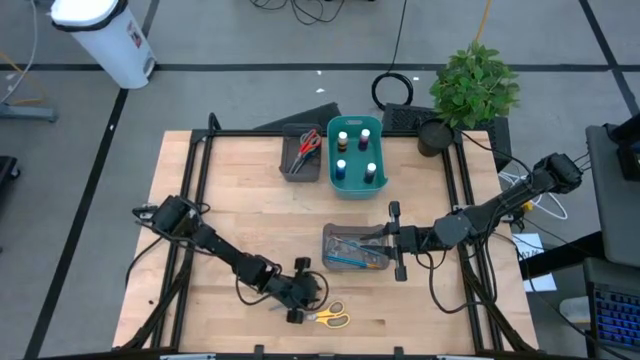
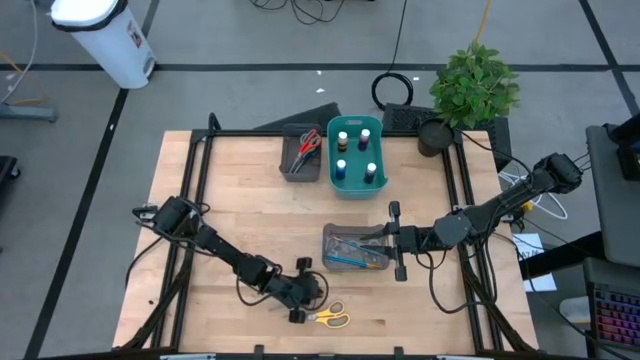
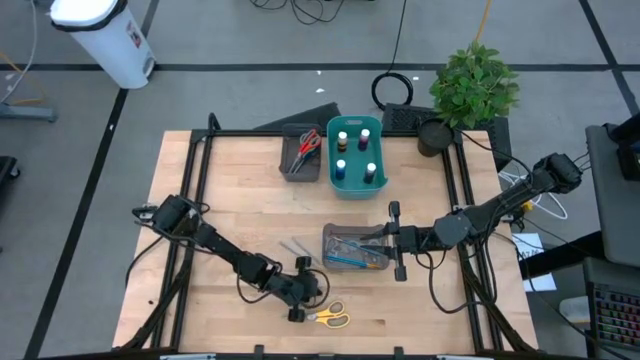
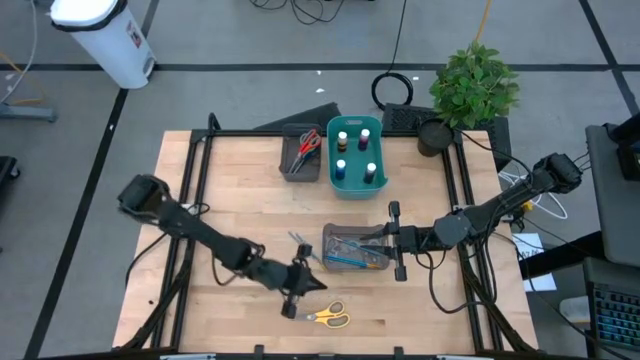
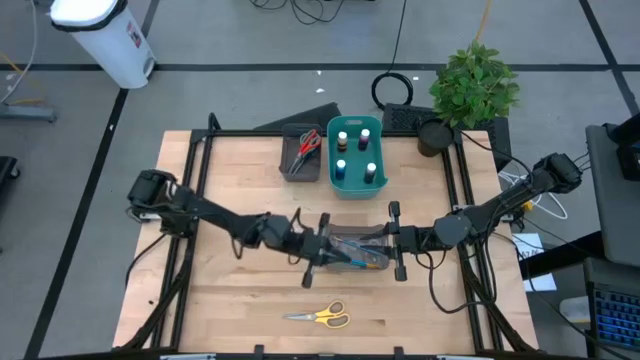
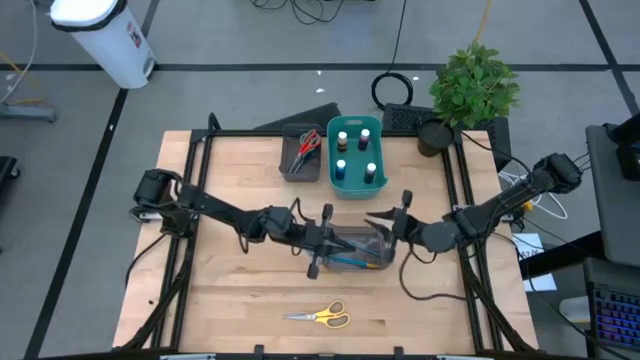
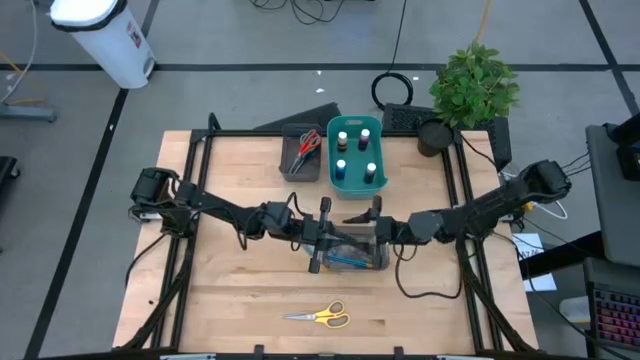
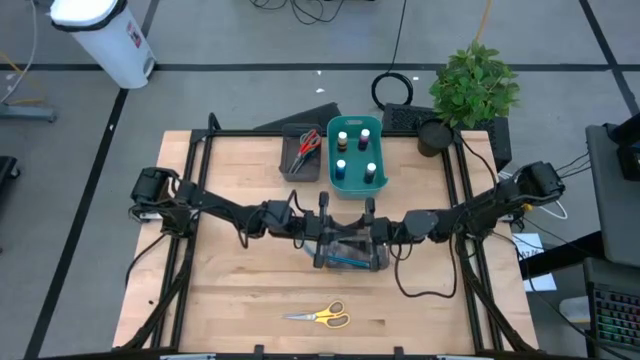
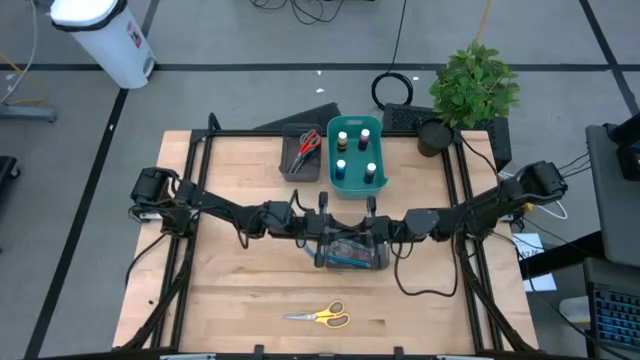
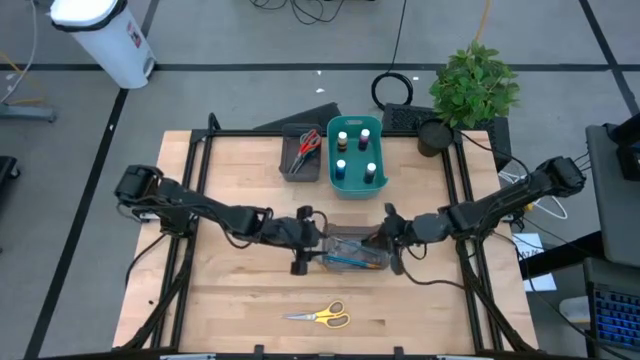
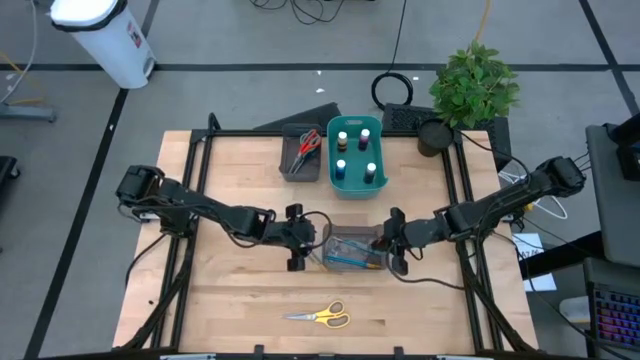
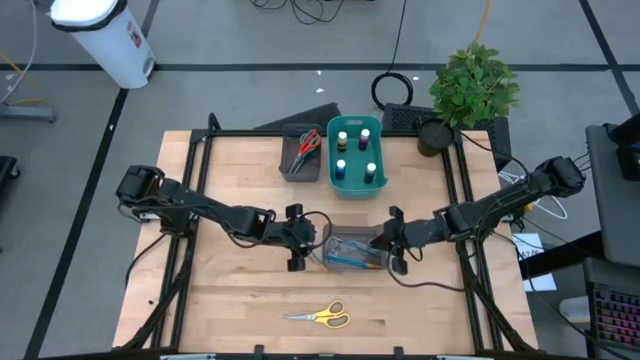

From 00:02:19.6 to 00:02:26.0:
Task: Pick & Place Paint Supplies
Put the blue paint brush into the bottom black bin

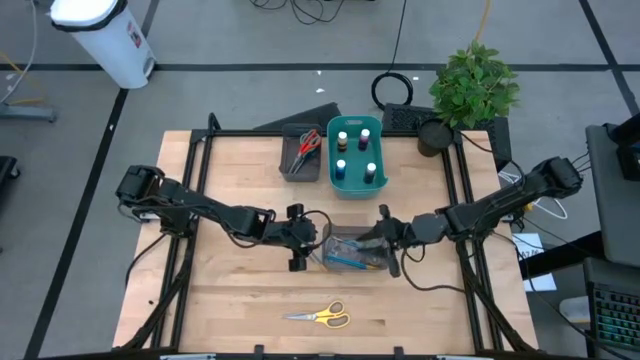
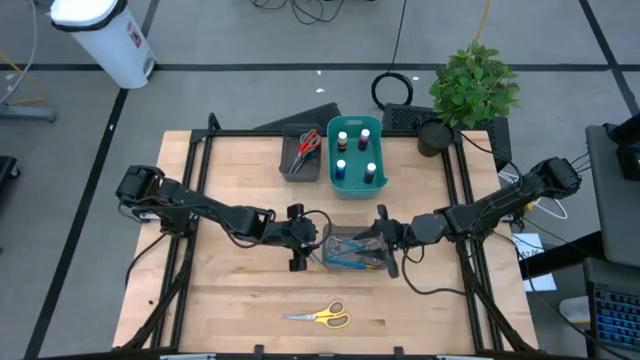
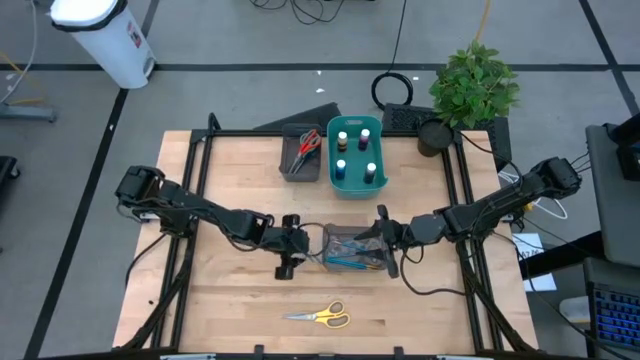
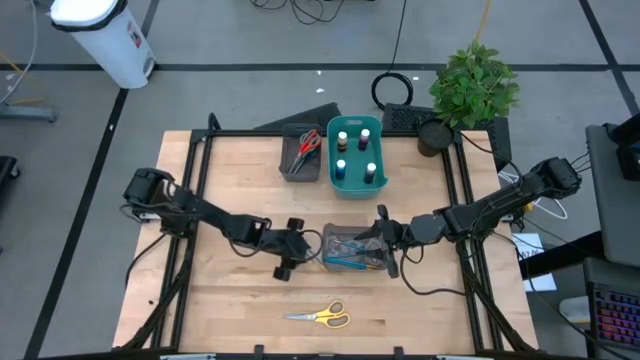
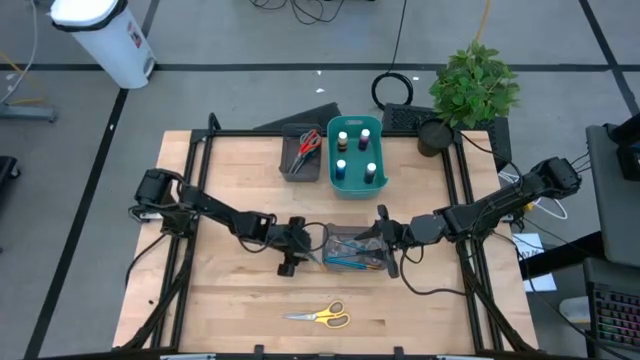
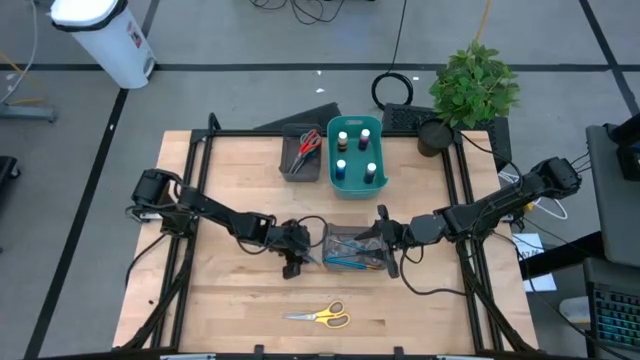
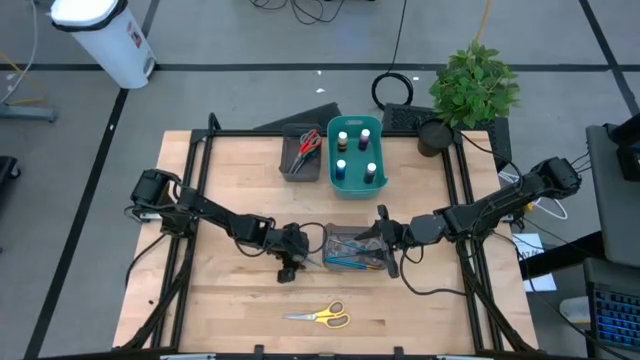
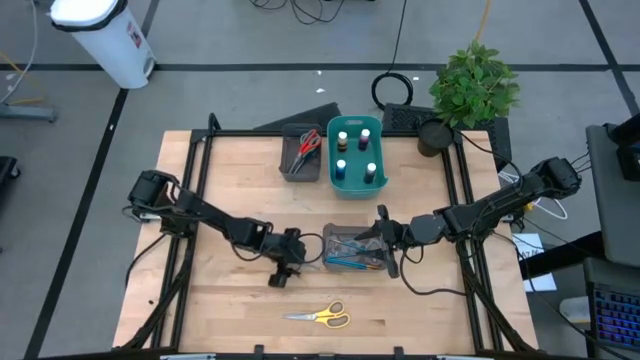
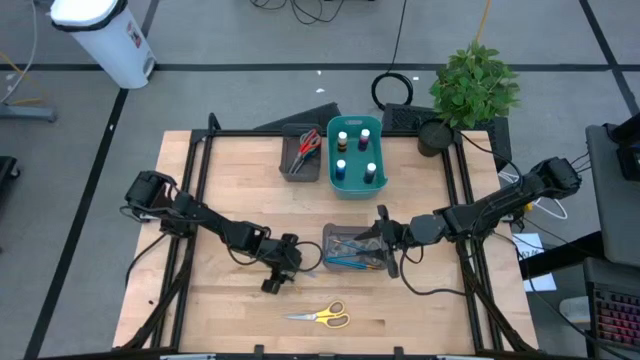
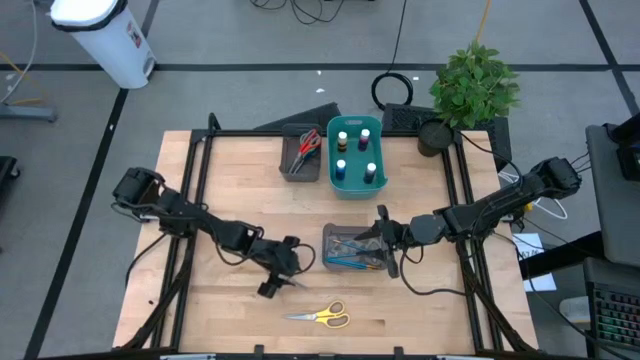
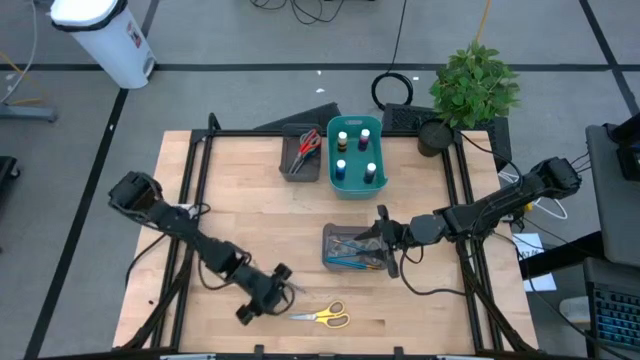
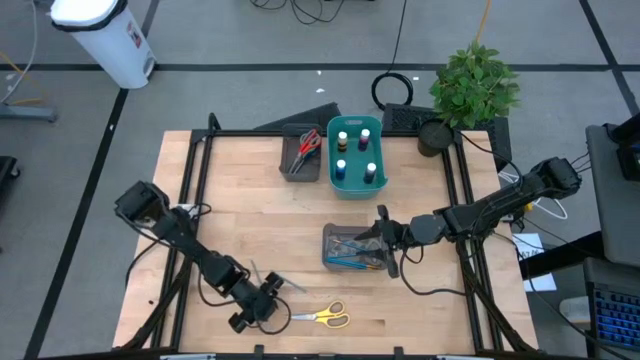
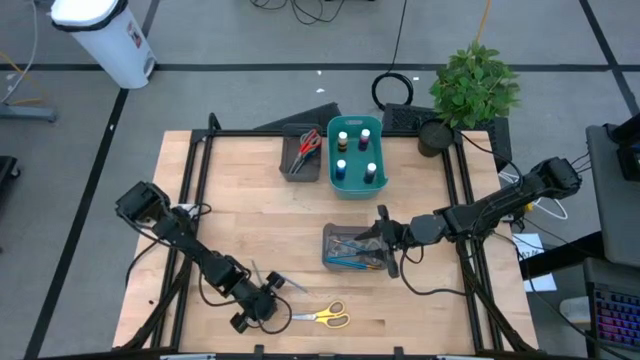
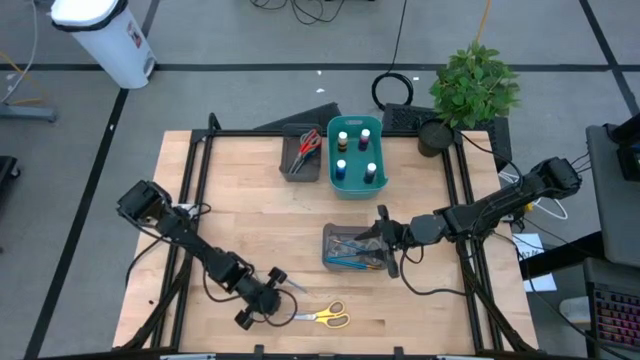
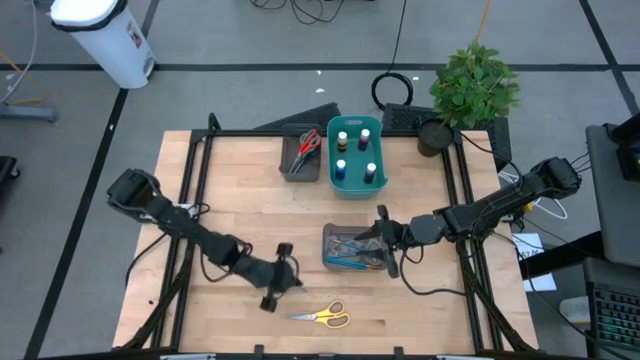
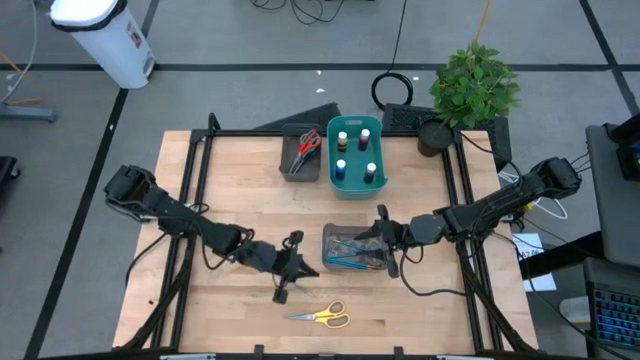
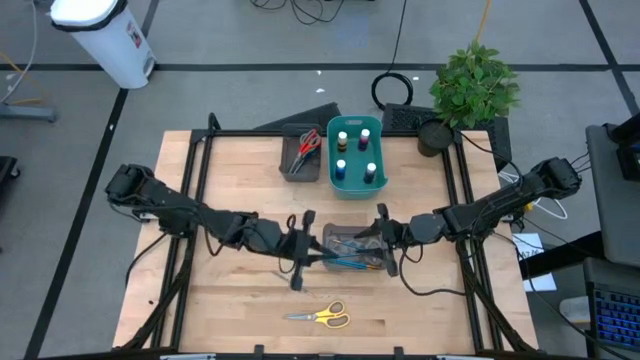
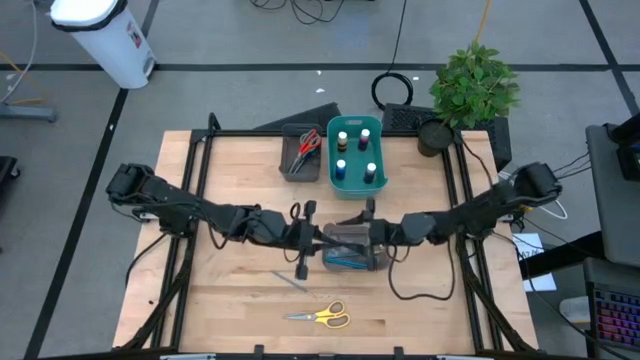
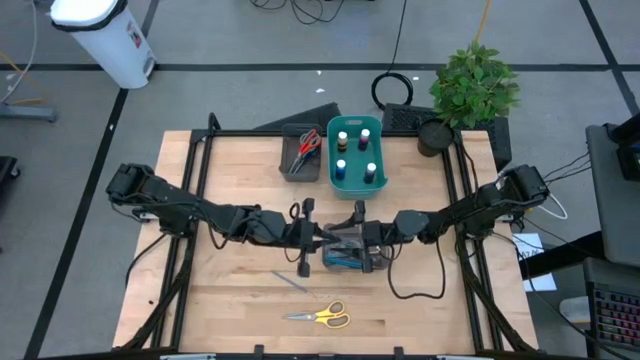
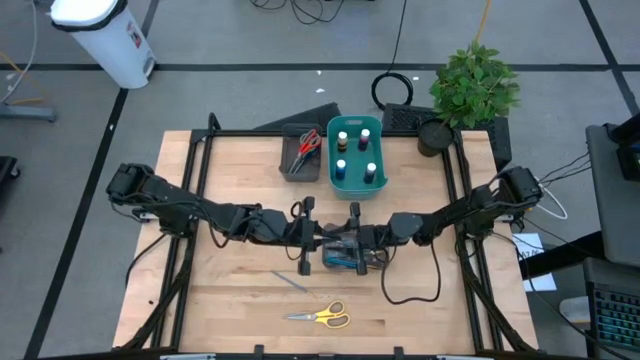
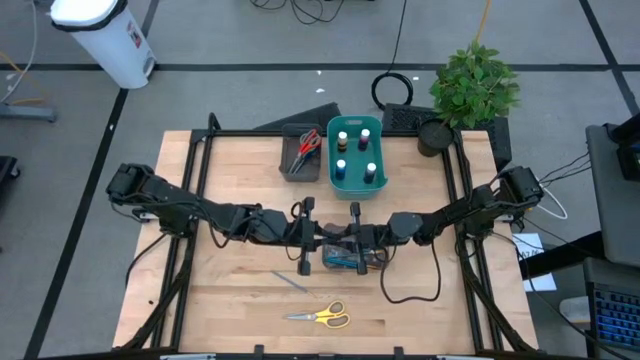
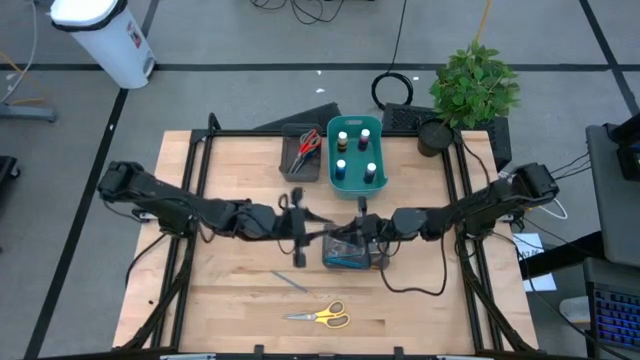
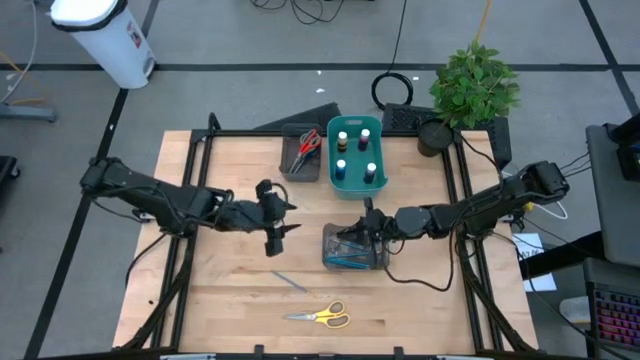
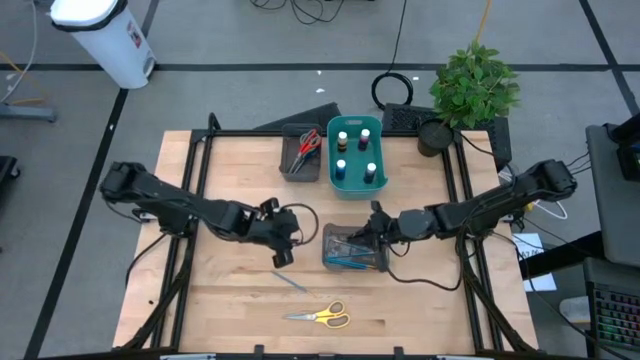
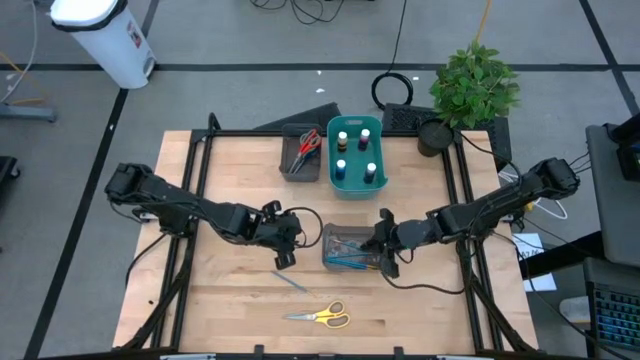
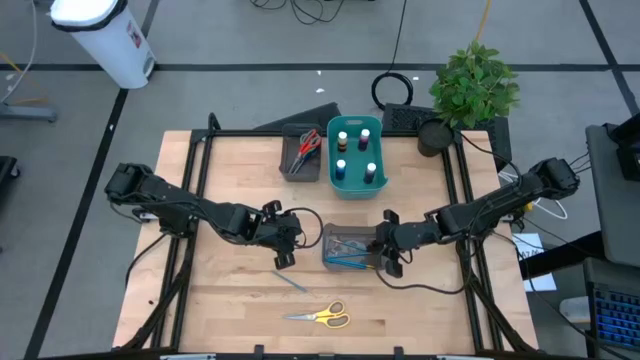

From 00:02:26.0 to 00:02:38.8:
Put the blue paint brush into the bottom black bin

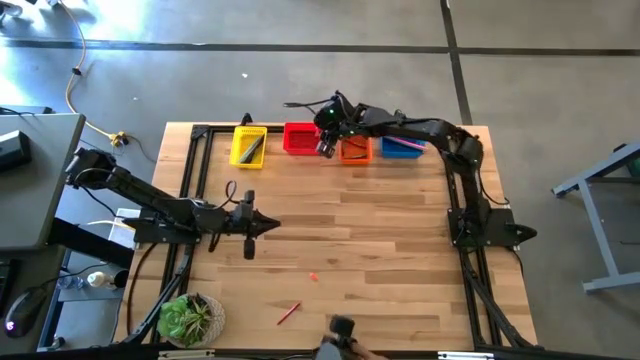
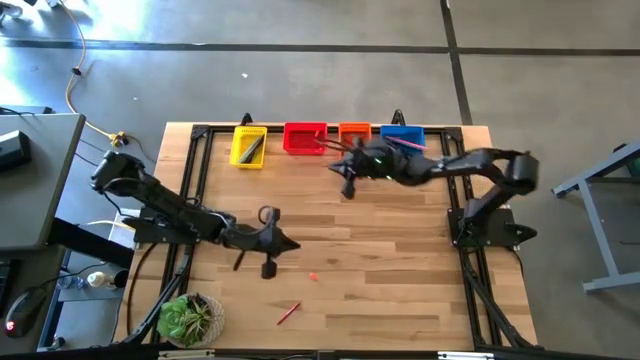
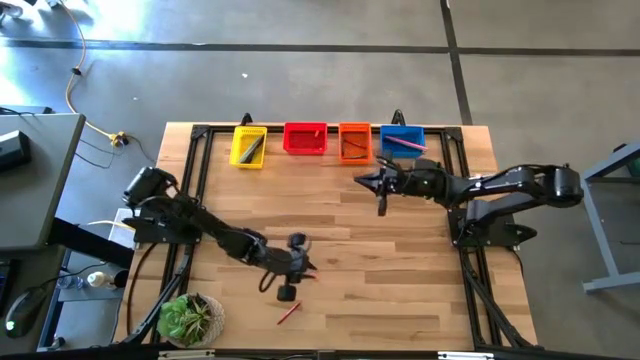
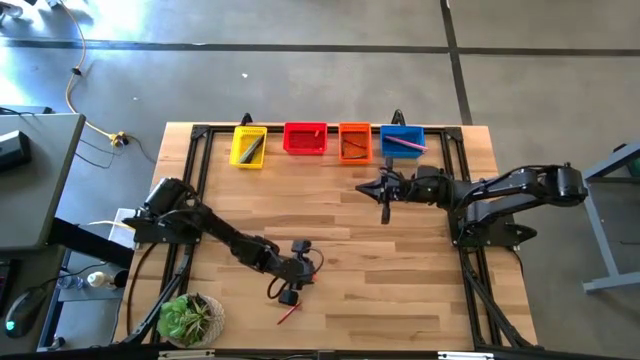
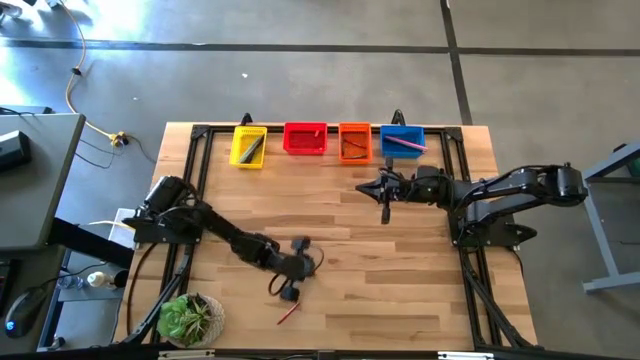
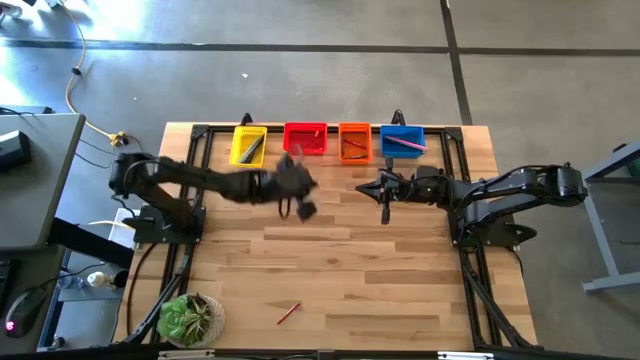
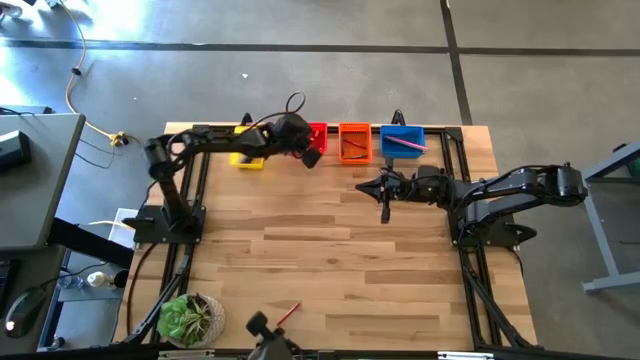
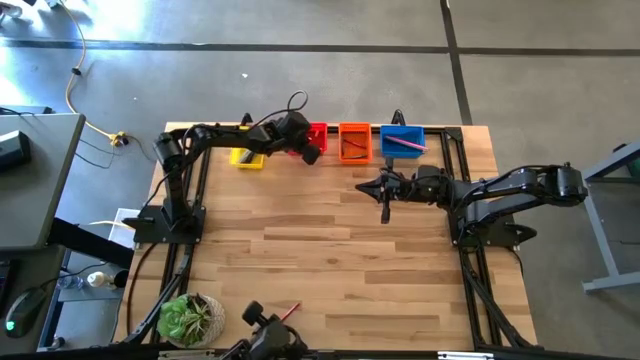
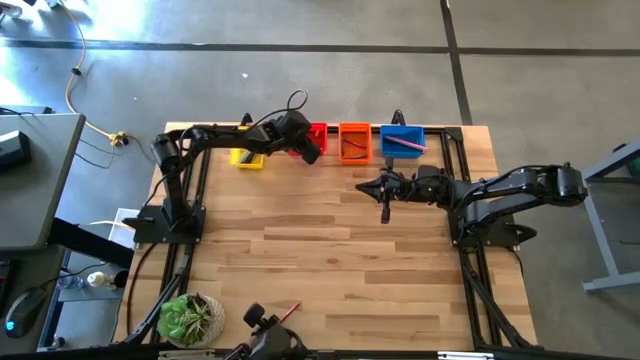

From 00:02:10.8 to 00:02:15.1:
Task: Sort crayons/erasers/pens/pencils in bins
Put the orange eraser into the red basket
